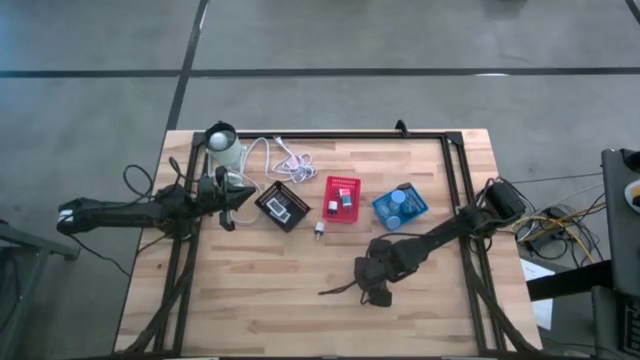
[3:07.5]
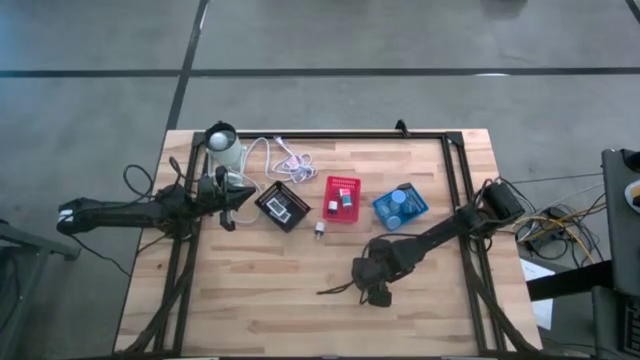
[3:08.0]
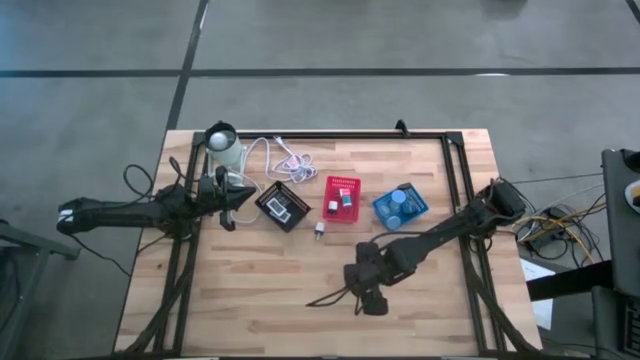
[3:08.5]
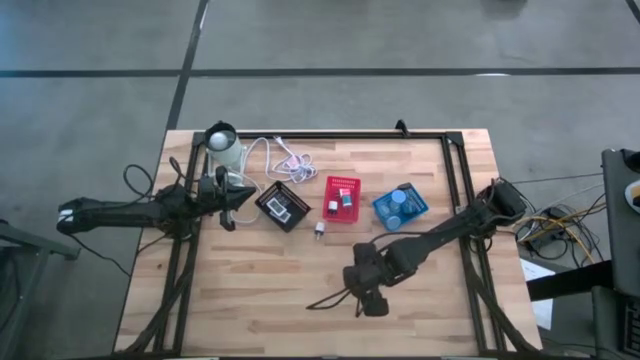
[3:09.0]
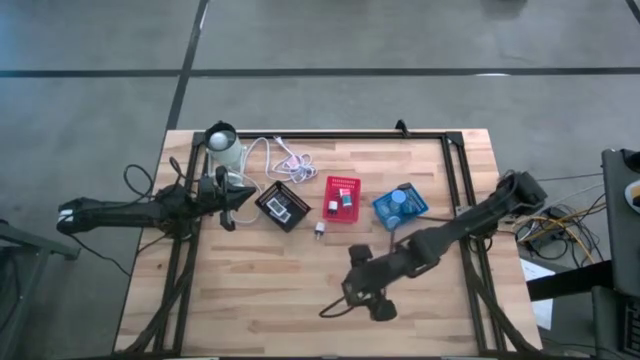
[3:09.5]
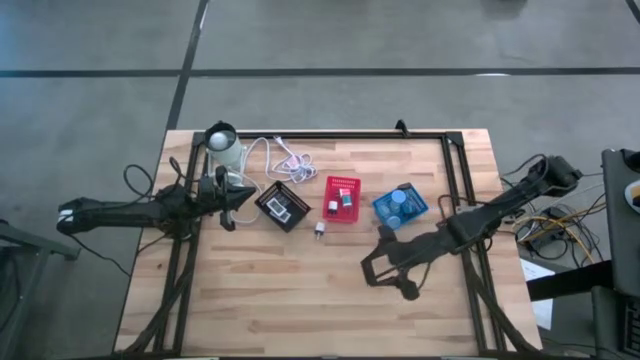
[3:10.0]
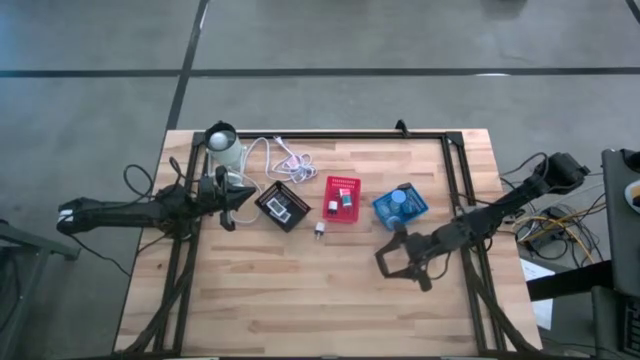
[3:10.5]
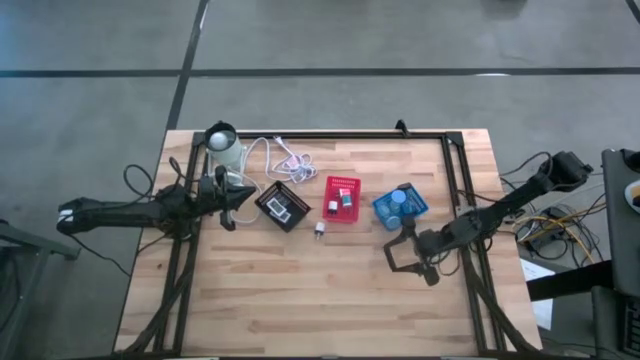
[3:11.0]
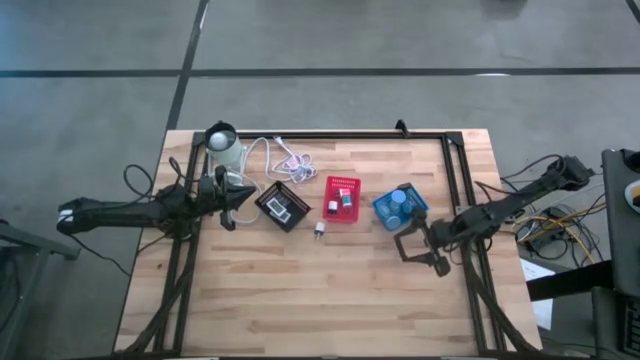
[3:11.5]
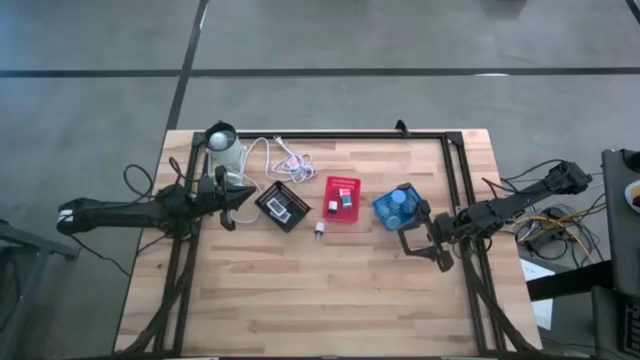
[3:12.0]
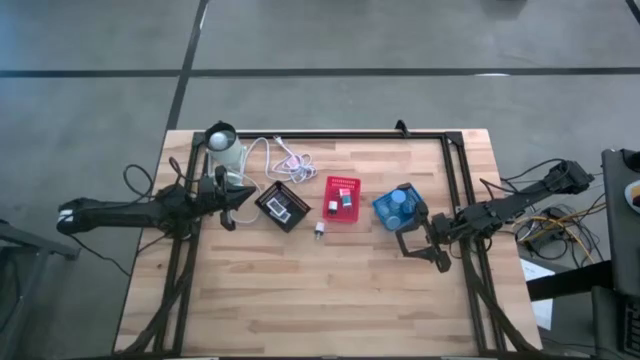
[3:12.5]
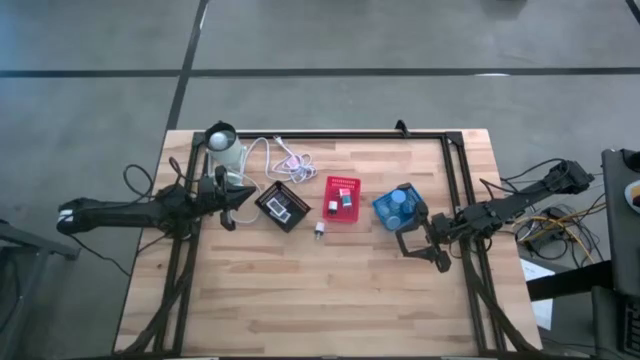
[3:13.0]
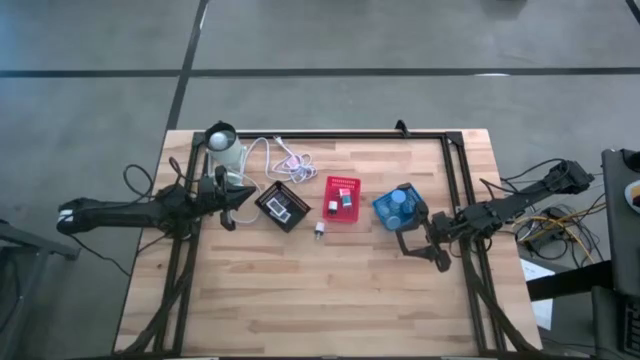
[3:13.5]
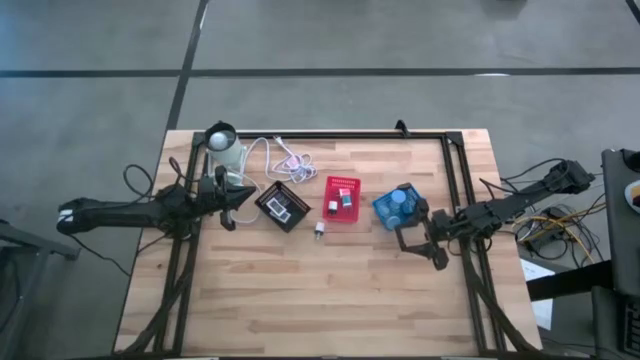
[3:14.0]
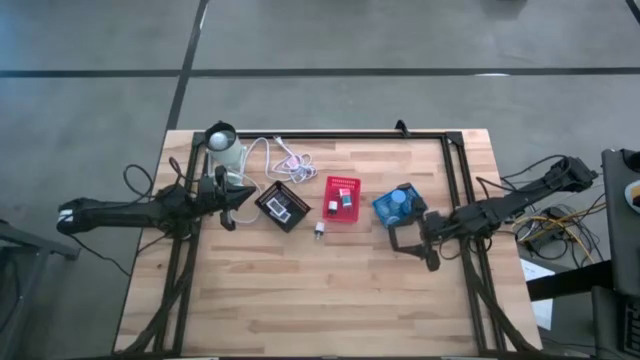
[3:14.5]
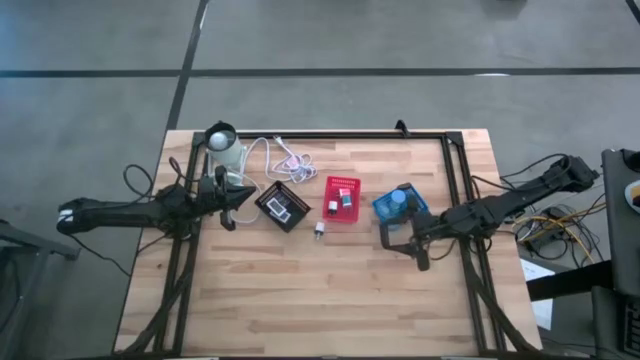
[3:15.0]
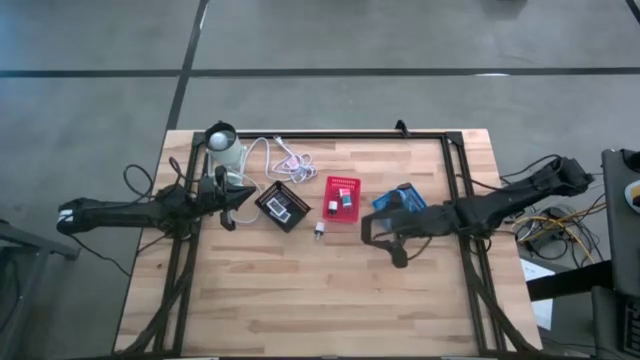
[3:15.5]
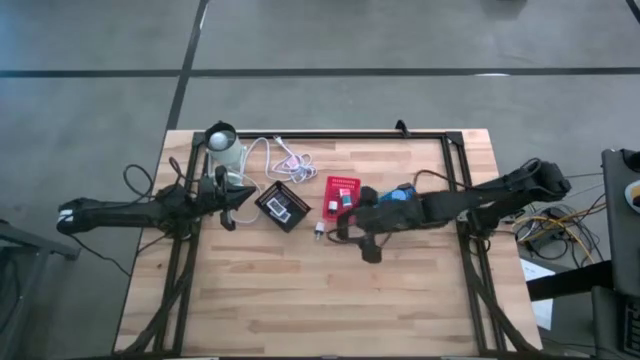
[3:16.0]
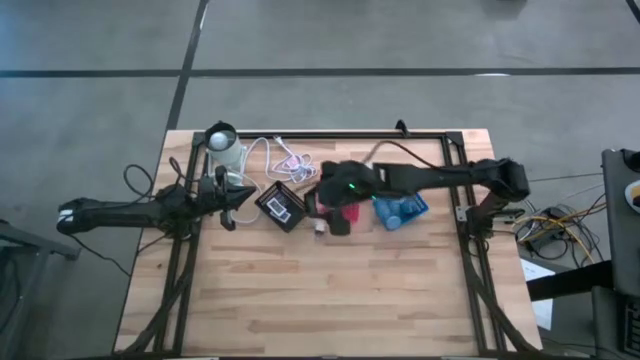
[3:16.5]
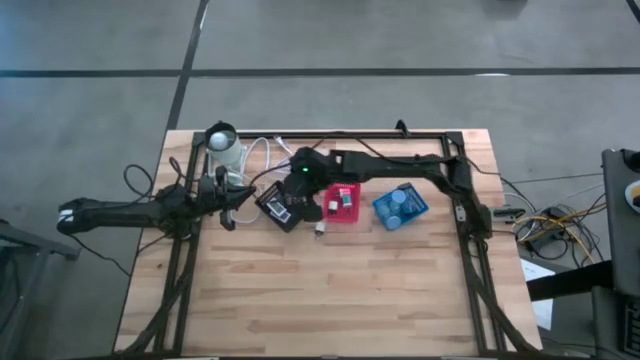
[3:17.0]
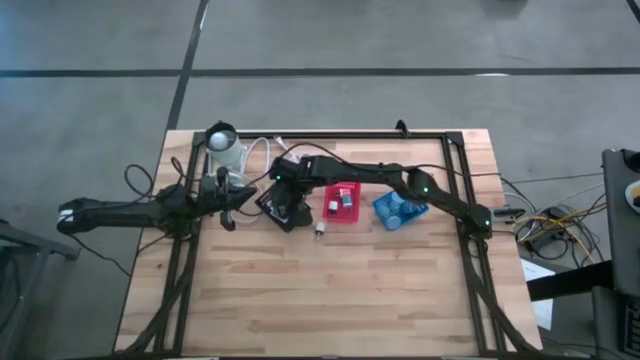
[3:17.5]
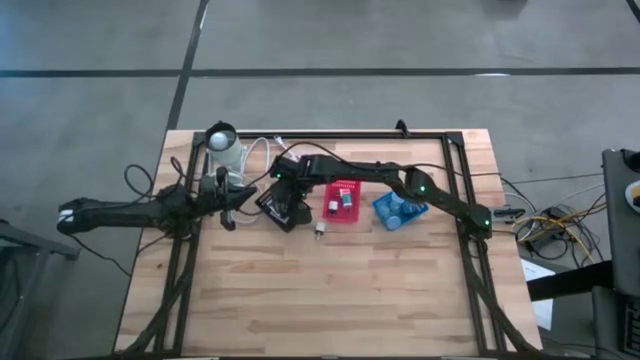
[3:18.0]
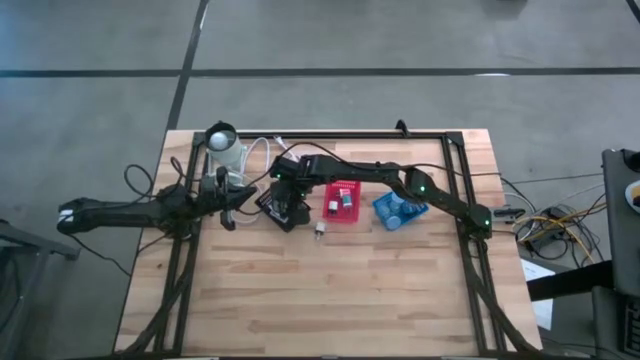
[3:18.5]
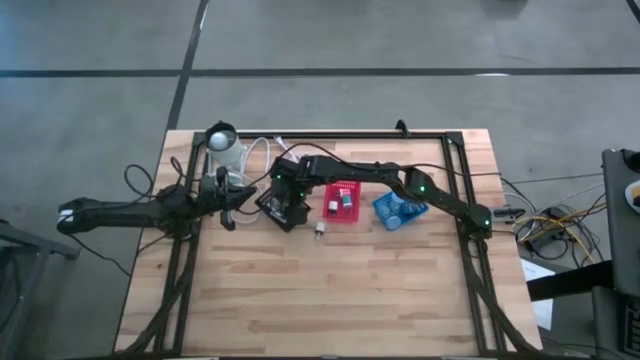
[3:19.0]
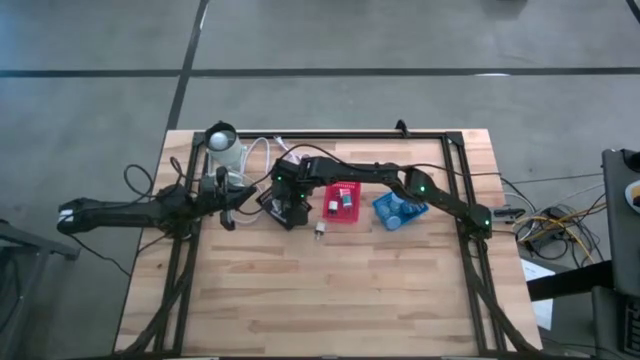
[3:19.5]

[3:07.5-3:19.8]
Task: Pick & Place Office items
Put the black digital clock into the black basket

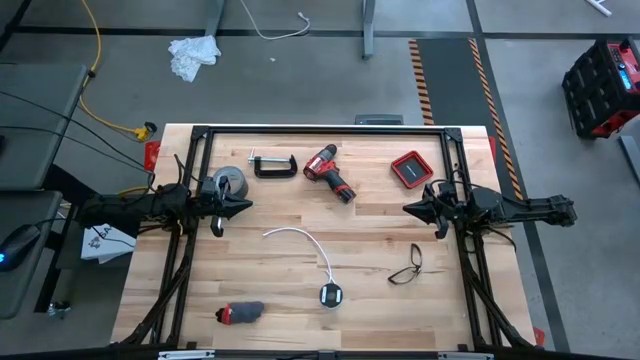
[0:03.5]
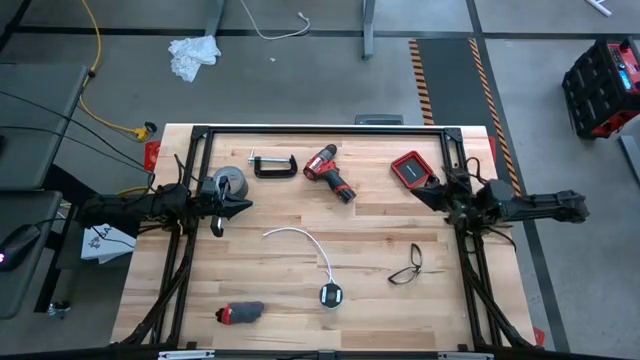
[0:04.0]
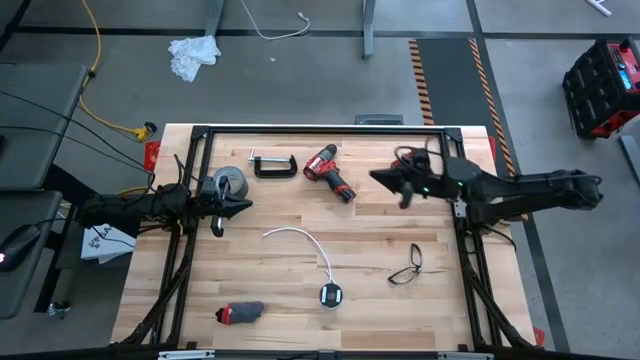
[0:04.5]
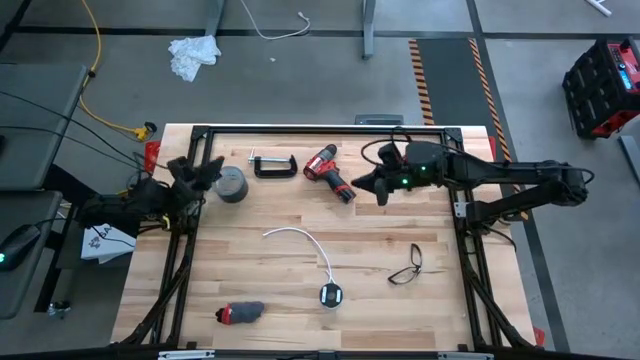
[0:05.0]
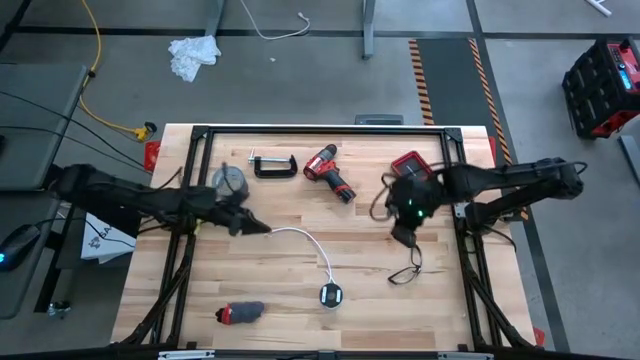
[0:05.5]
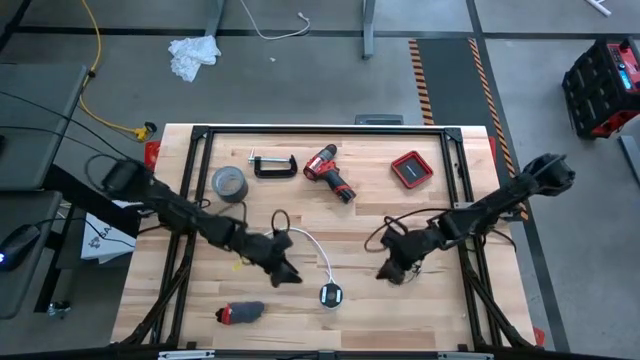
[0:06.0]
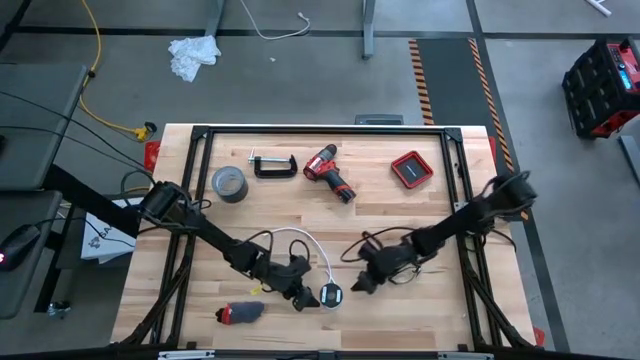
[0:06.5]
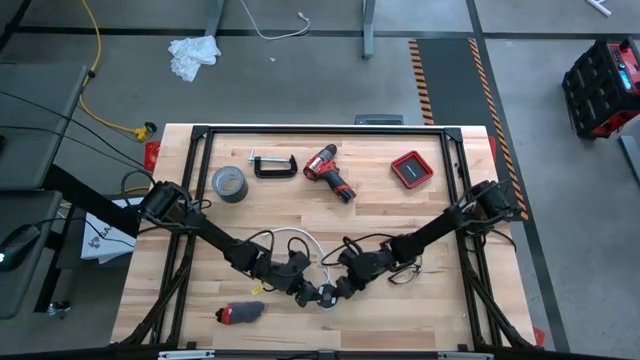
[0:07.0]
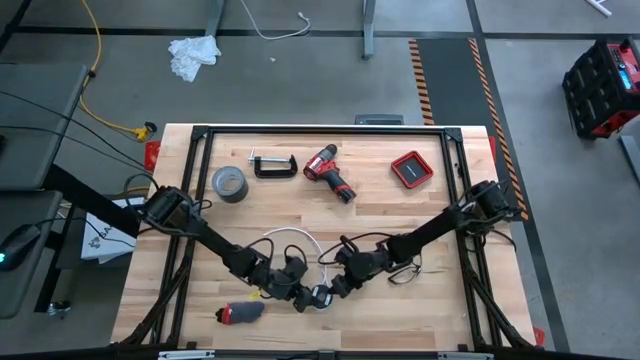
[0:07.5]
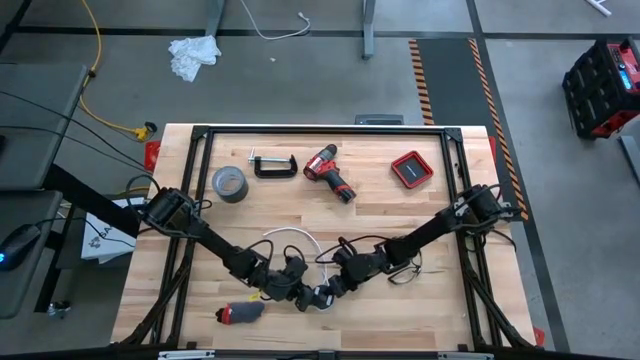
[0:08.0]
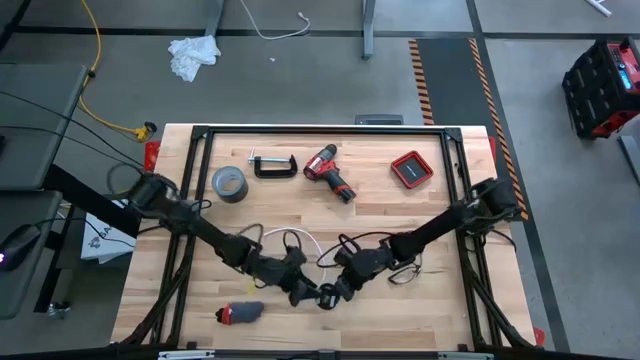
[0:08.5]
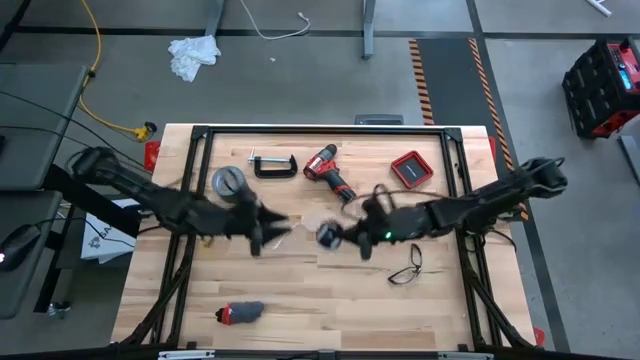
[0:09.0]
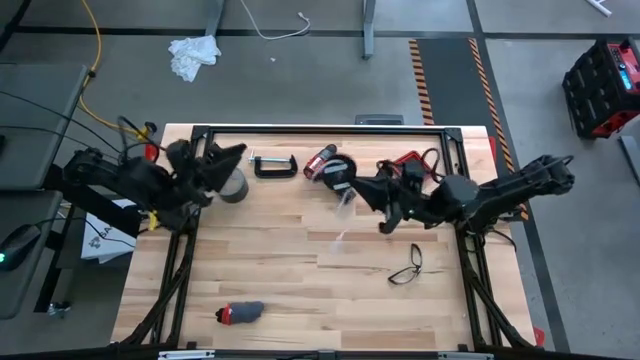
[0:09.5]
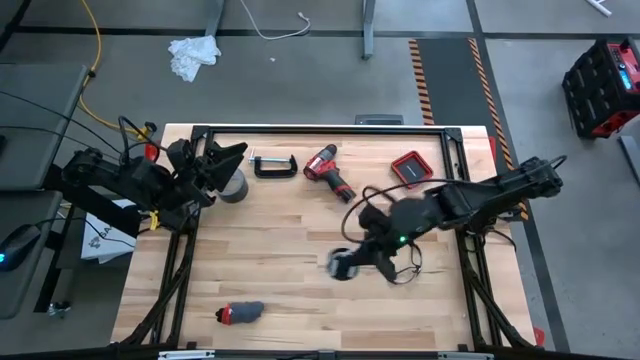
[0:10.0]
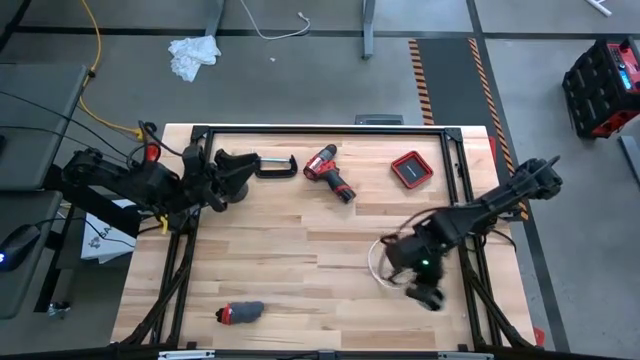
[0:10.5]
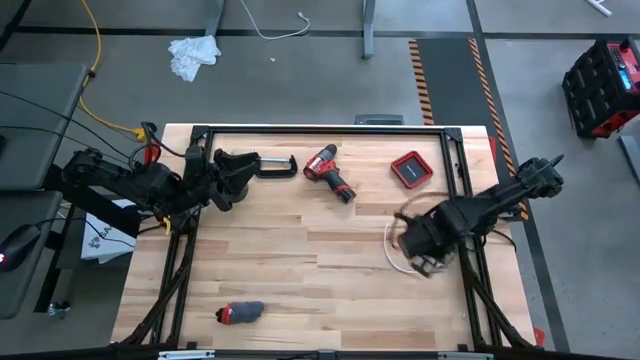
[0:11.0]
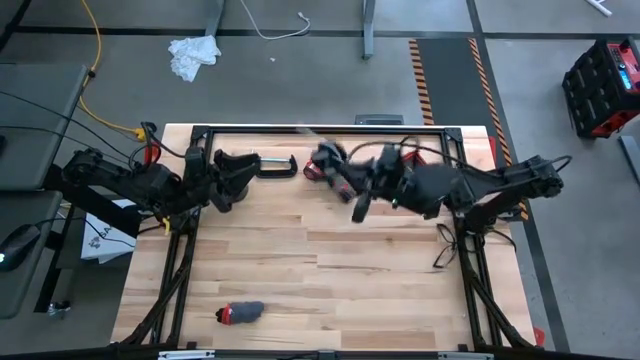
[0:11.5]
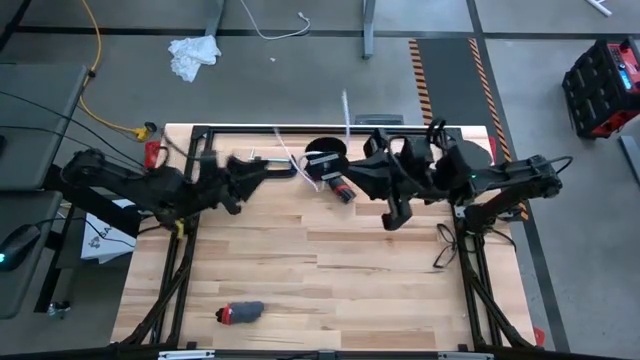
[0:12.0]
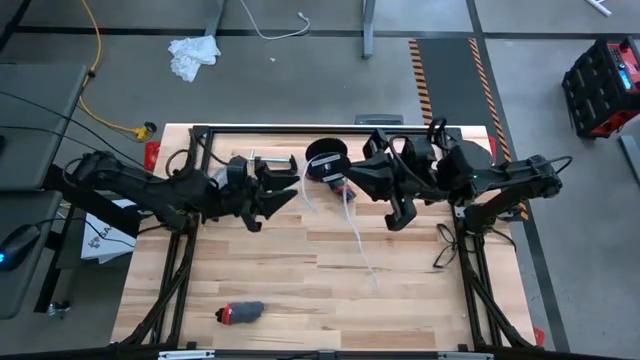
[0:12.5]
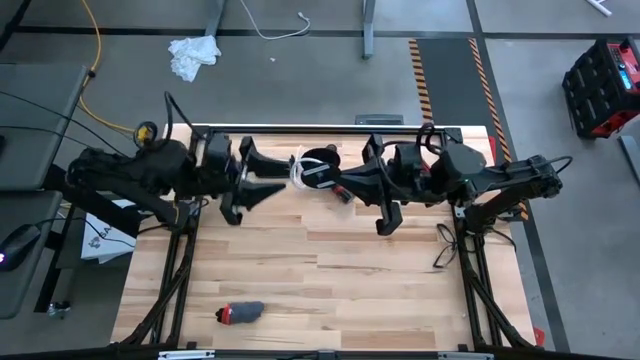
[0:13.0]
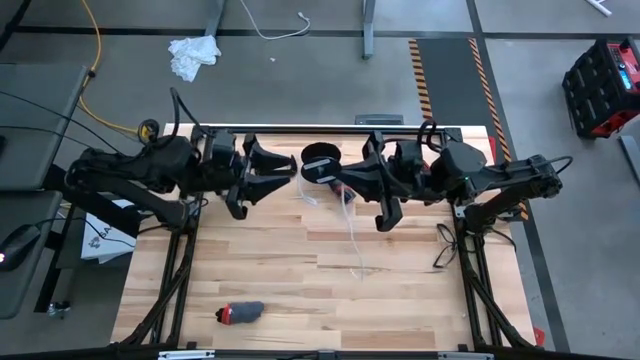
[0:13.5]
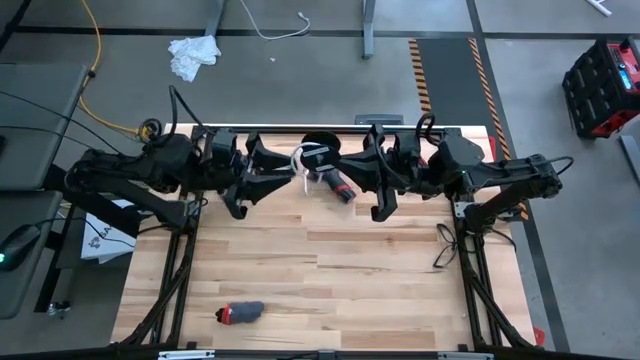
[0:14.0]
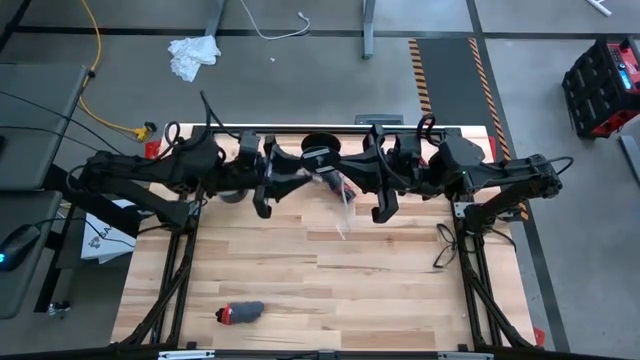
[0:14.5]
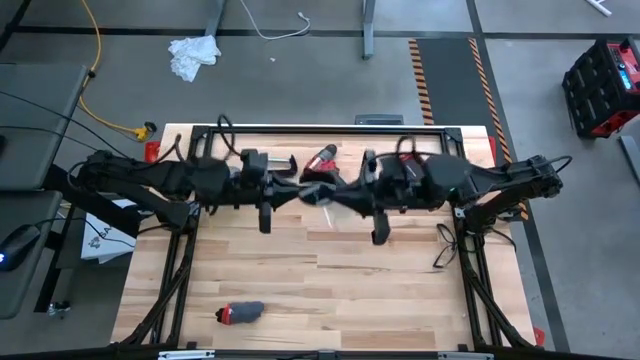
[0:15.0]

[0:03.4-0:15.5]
Task: Coil cords
Uncoil the white cable wire from the black spool
